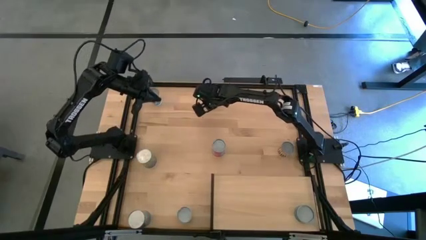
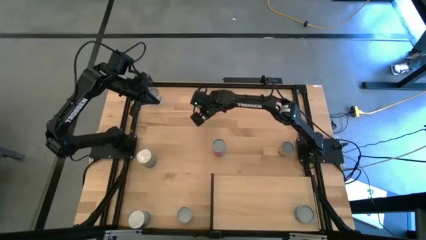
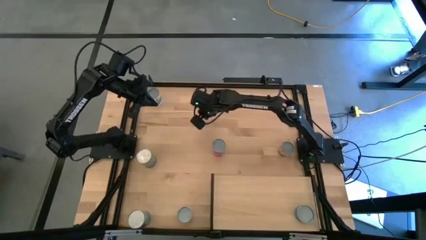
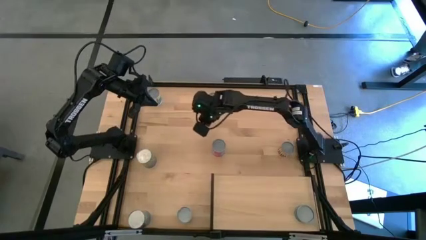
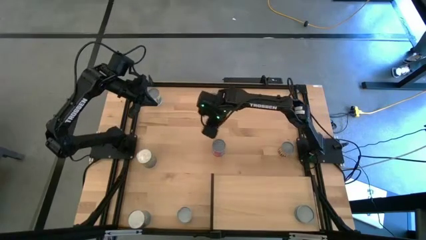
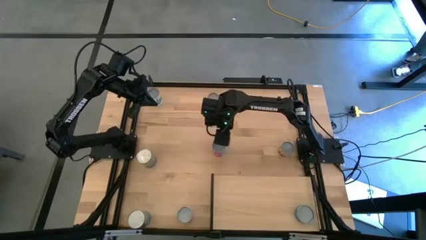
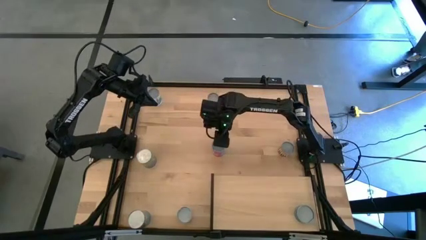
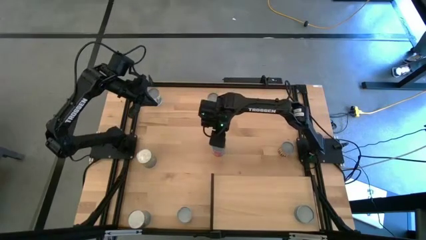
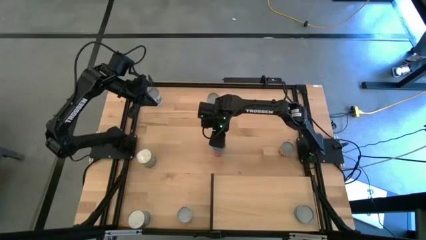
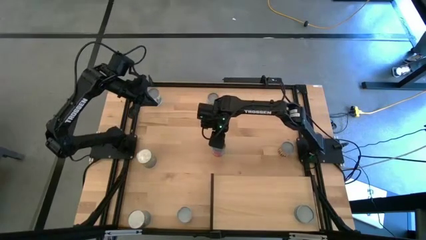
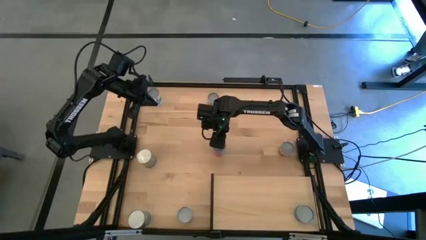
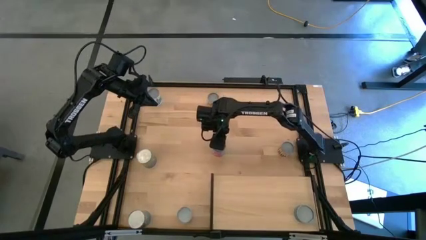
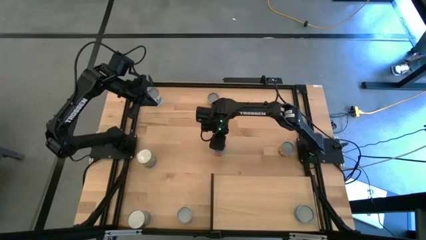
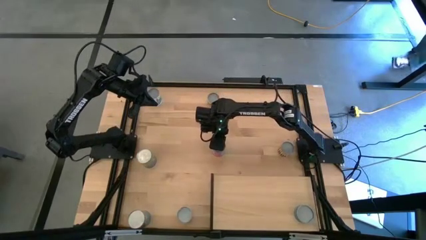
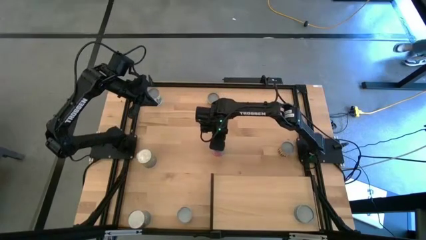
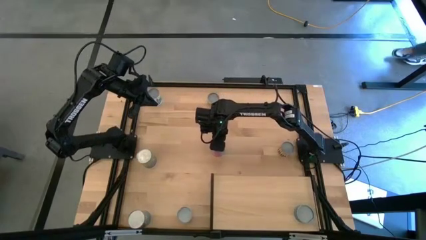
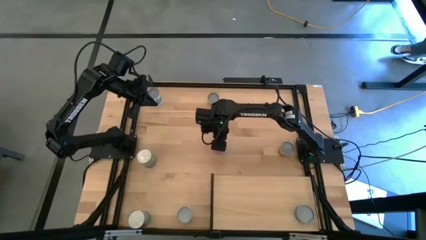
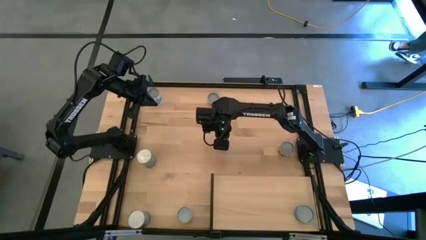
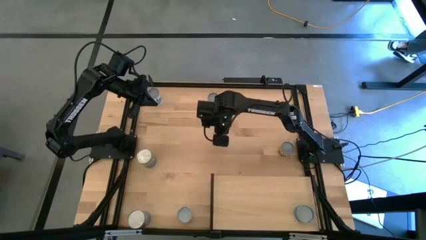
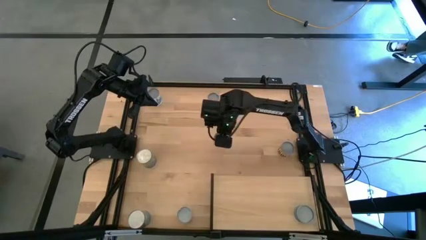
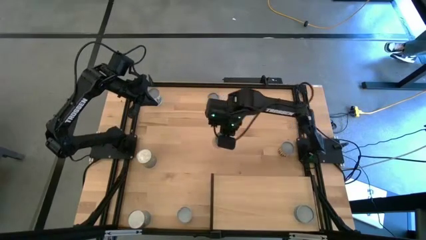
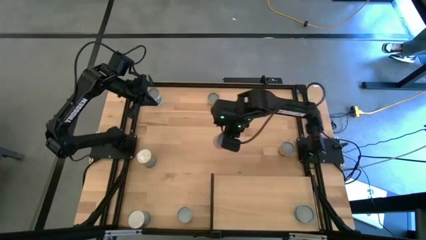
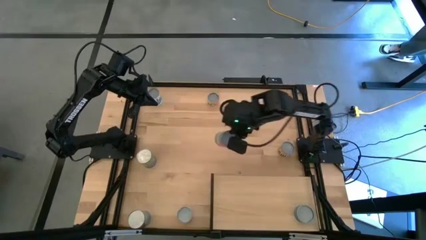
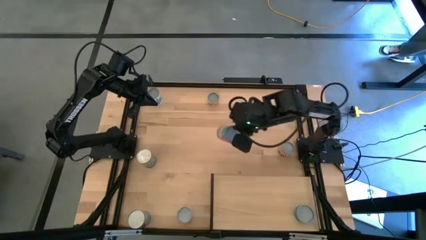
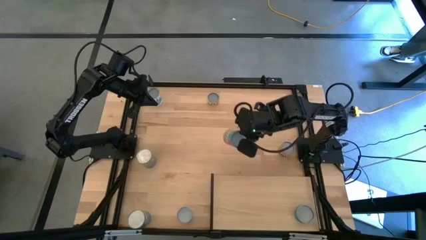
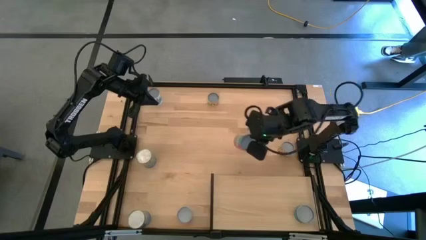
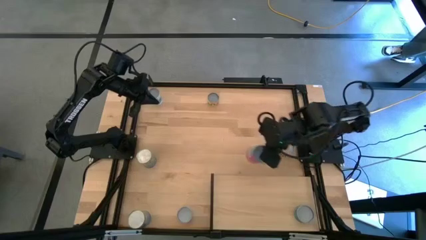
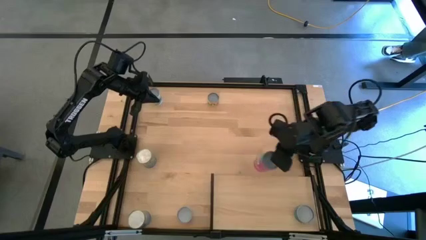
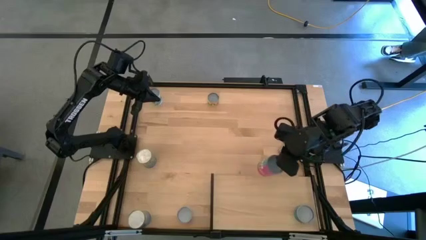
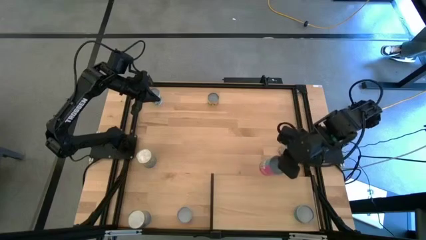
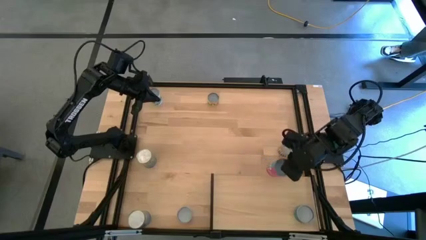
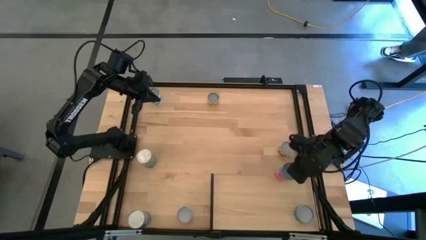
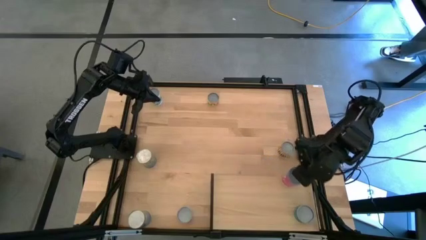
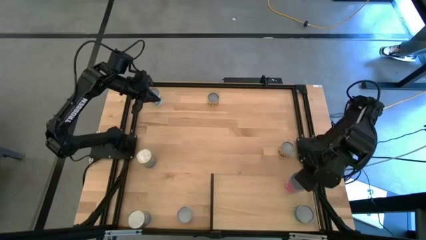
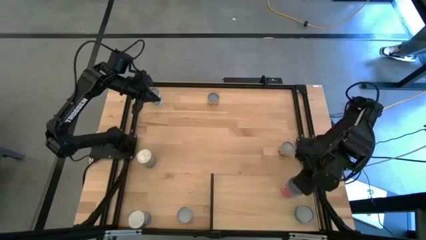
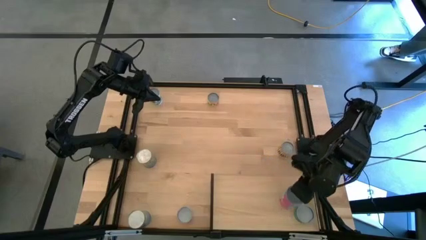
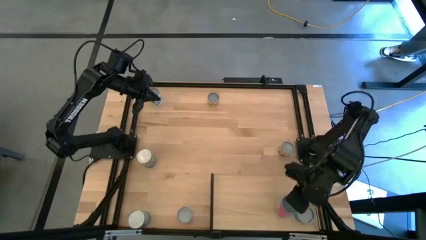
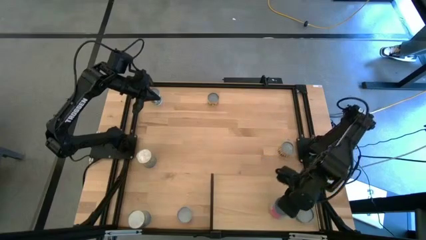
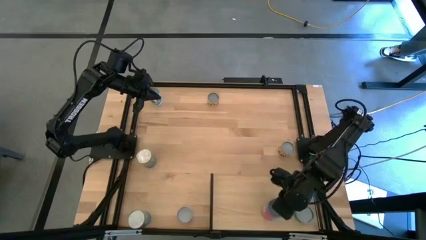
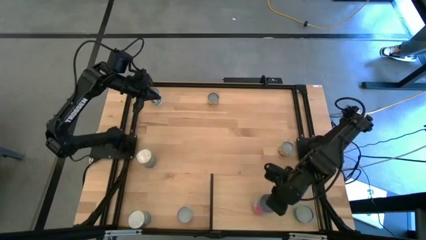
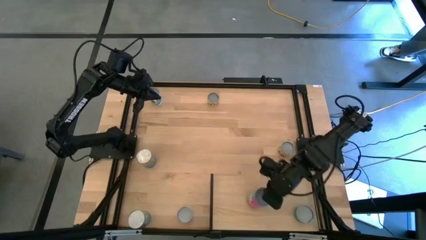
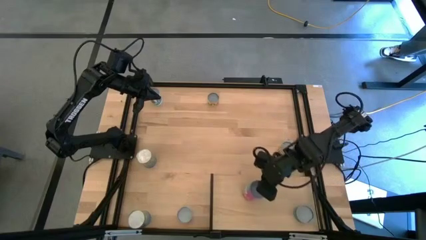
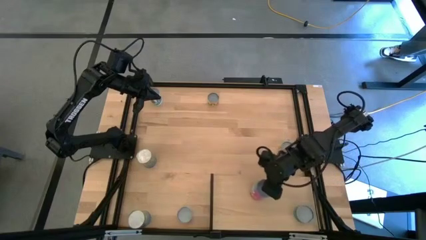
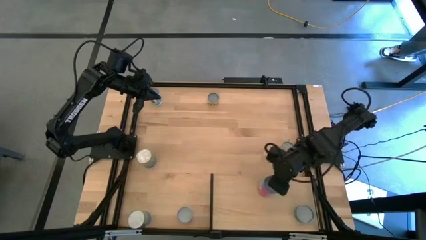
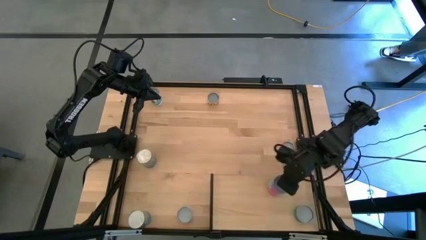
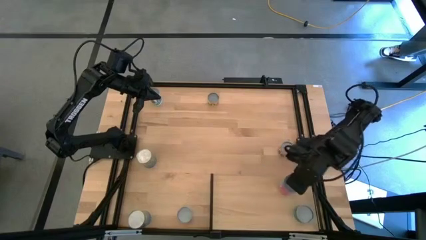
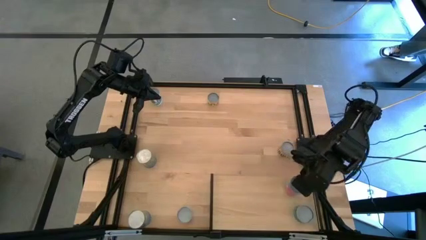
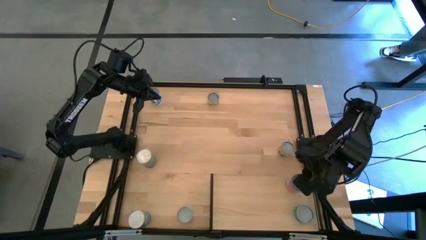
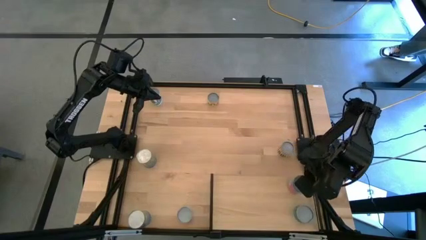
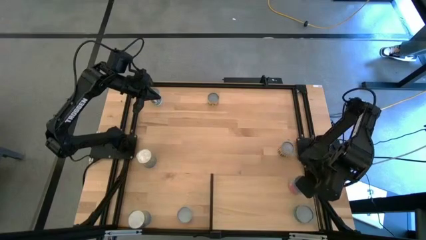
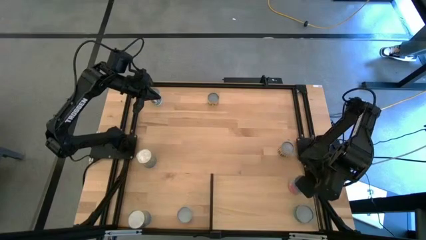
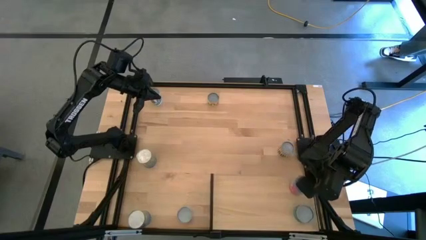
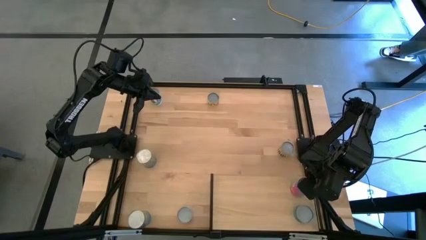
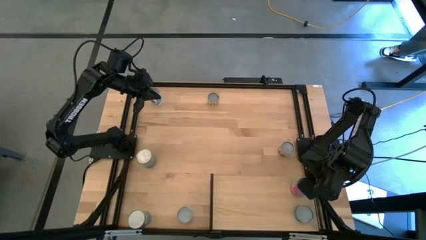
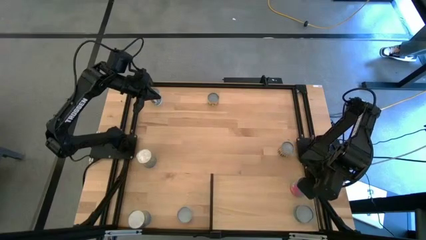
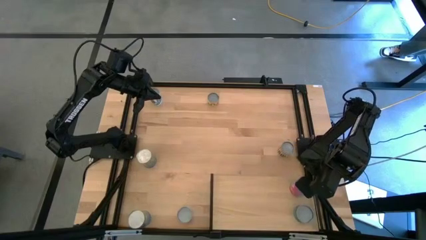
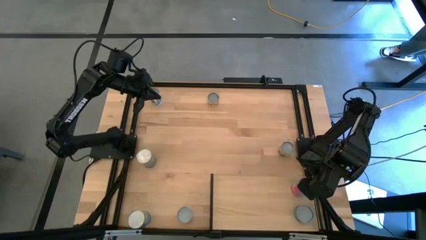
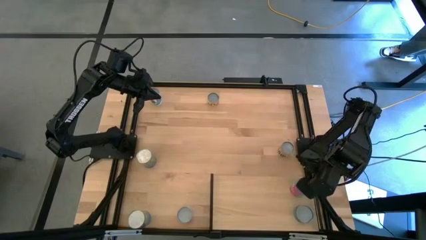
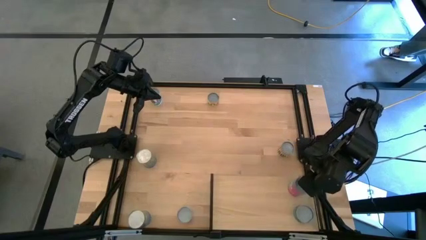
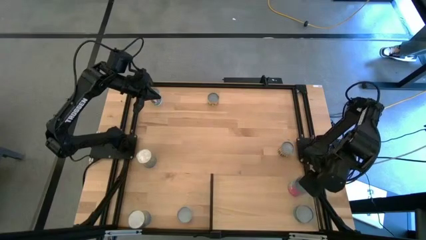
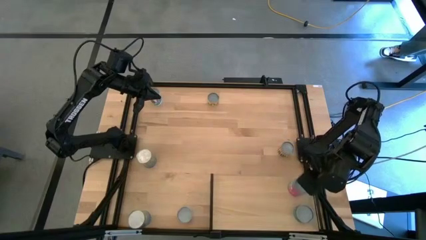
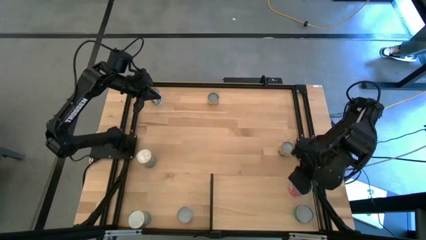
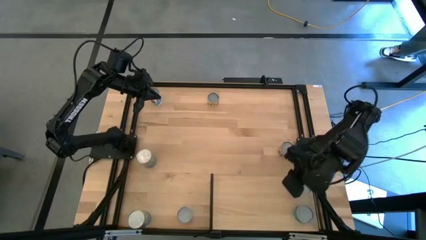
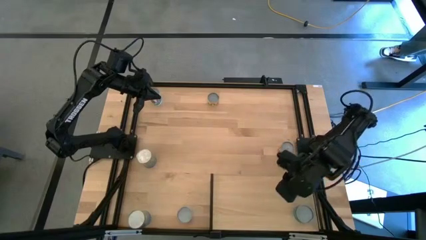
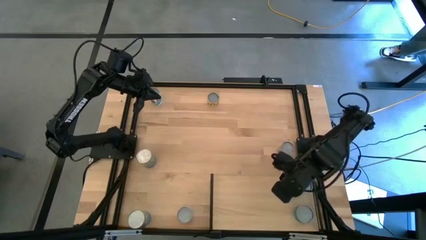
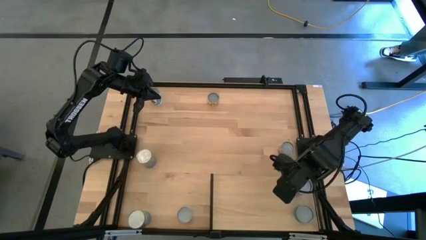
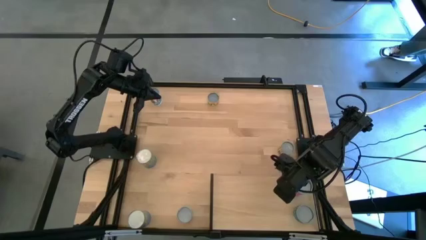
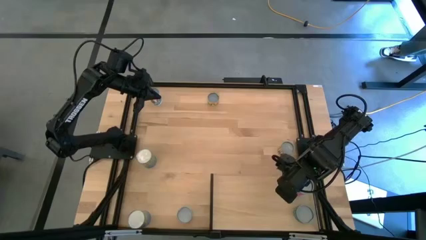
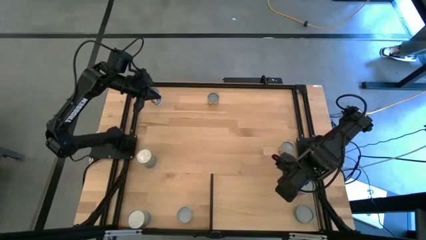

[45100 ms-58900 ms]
Task: Pick and place cans onto a shelf
Put the canned chicken soup on the shelf
